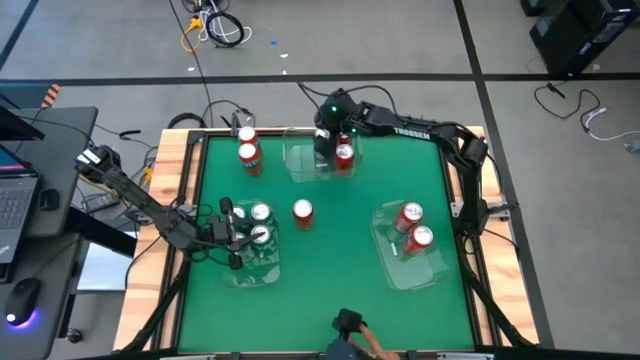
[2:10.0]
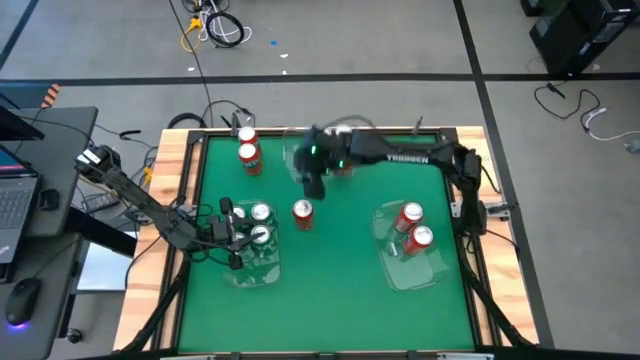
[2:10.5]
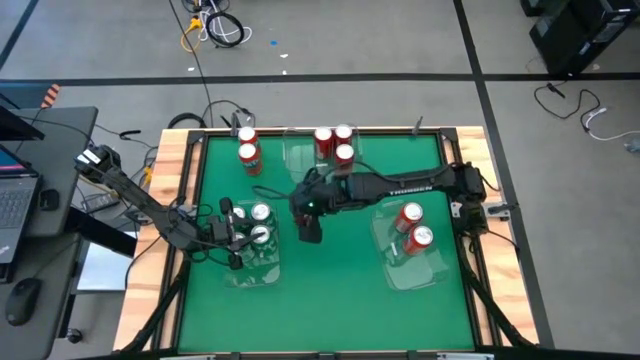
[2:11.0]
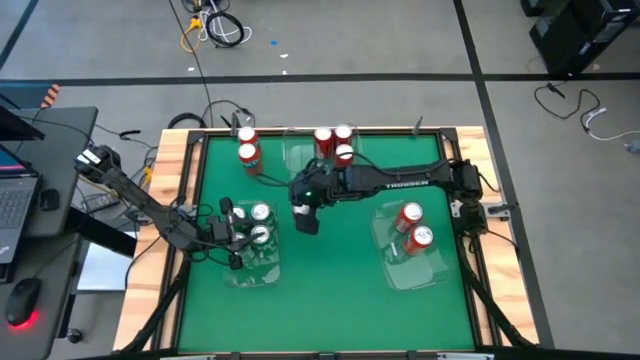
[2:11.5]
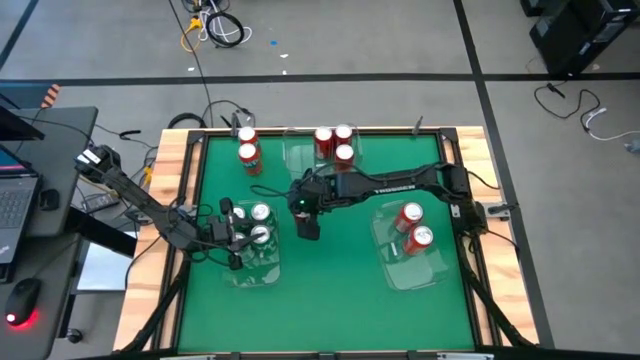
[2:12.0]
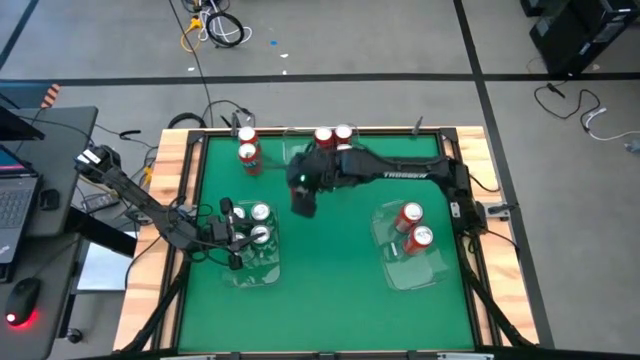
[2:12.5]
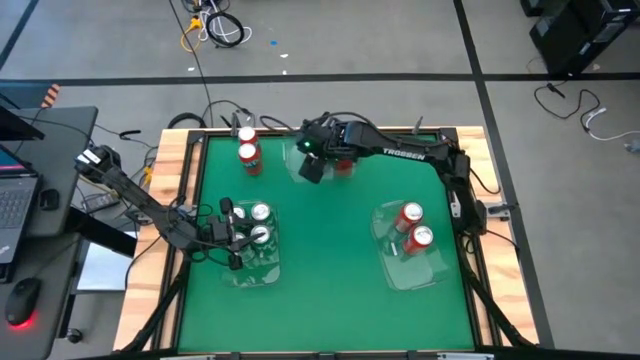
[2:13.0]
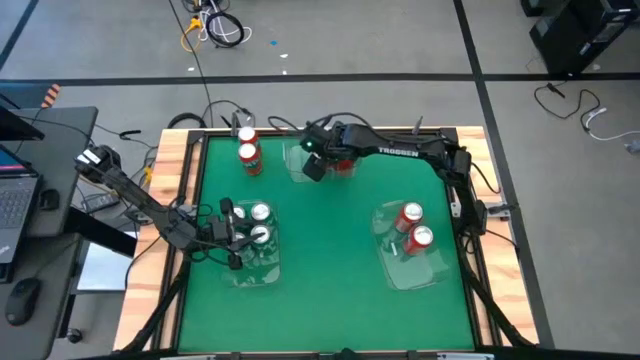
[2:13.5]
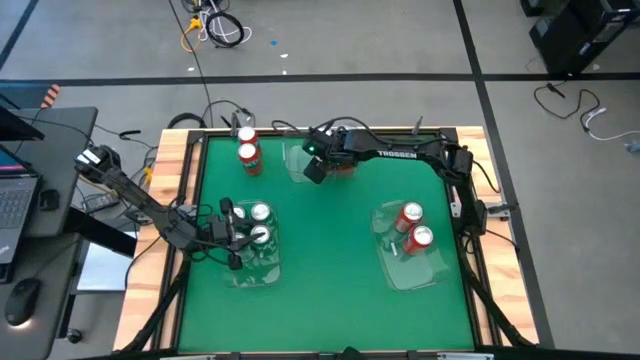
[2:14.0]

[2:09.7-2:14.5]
Task: Sort soda cans
Put the red-black soda can into the top transparent bin

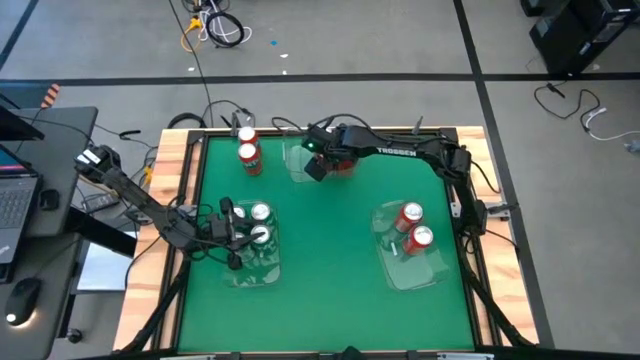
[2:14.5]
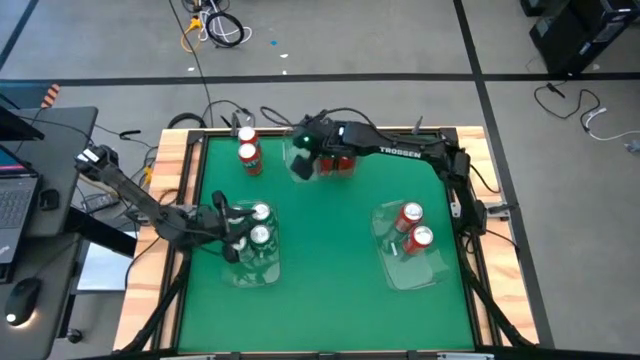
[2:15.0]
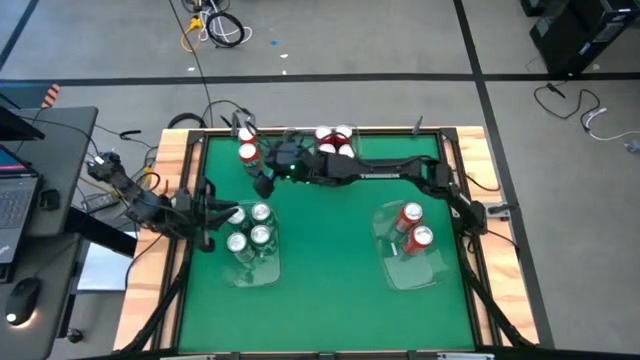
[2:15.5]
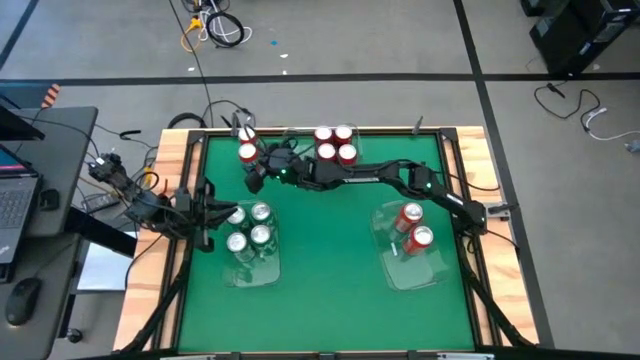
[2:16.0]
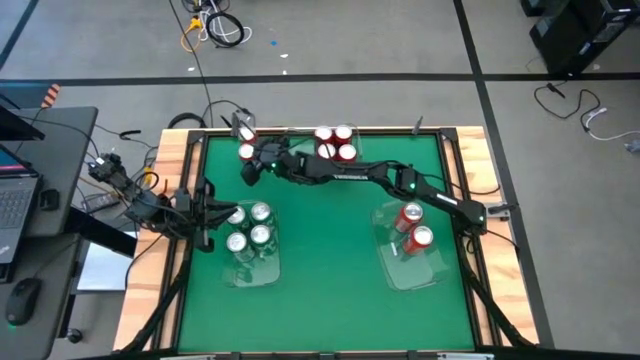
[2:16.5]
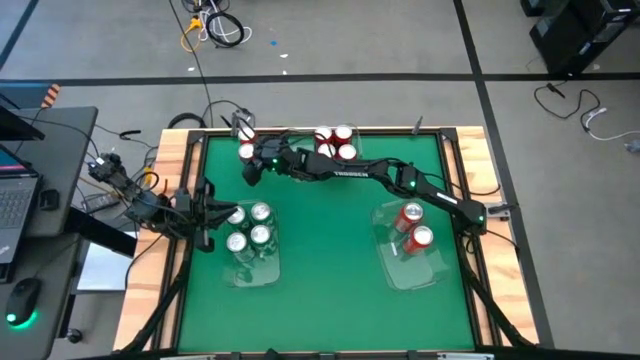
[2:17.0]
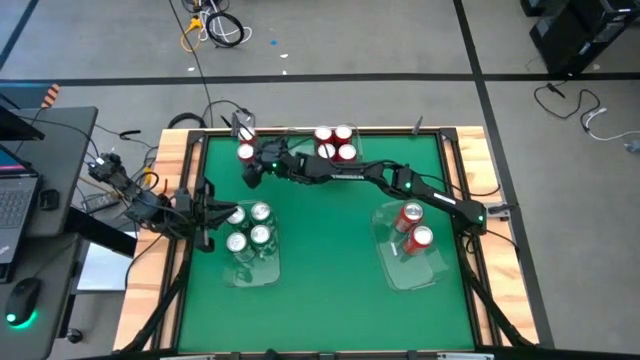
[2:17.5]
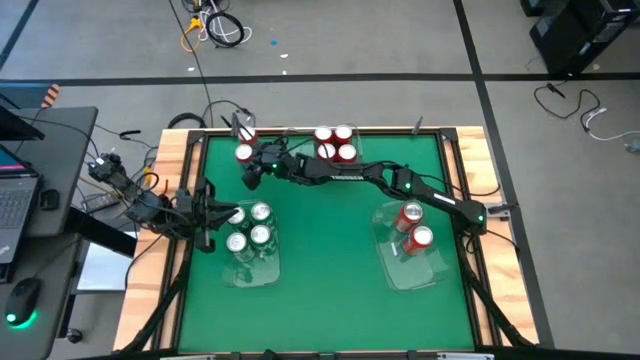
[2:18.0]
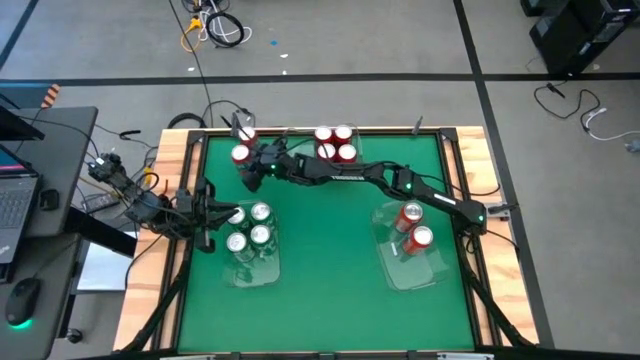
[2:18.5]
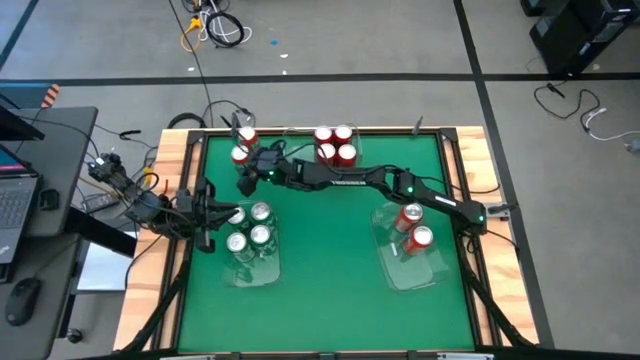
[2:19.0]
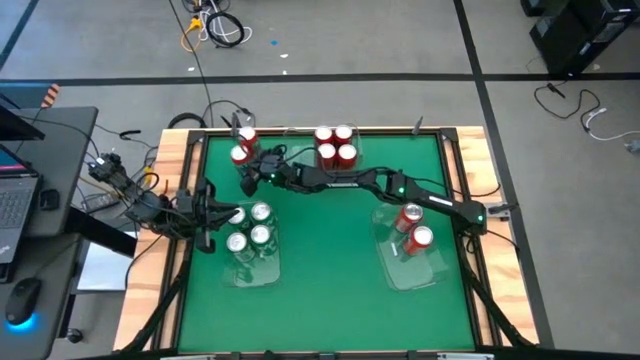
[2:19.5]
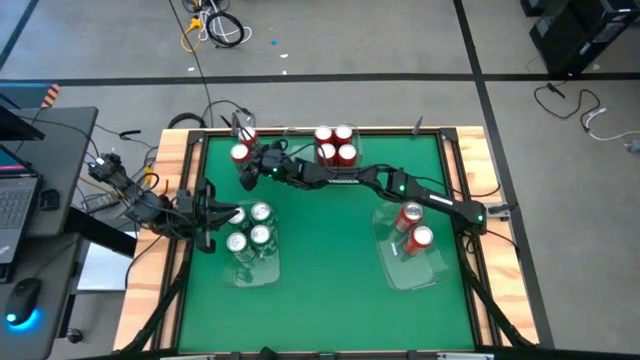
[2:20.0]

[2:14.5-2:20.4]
Put the red soda can into the middle right transparent bin
